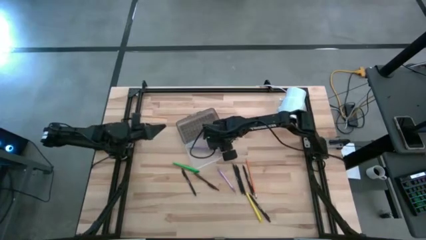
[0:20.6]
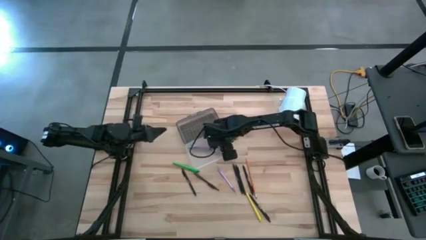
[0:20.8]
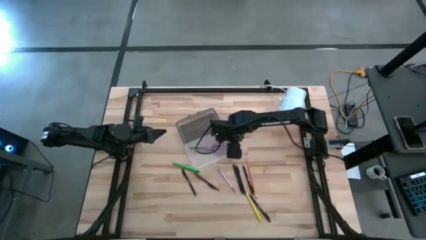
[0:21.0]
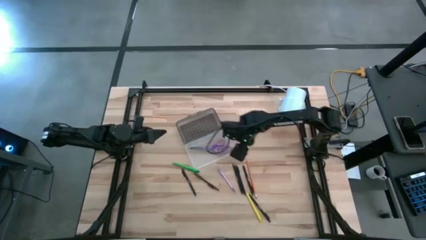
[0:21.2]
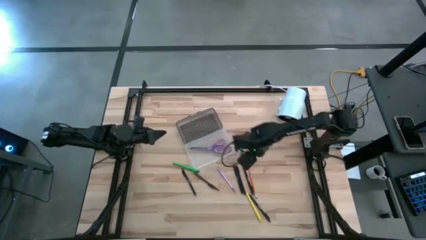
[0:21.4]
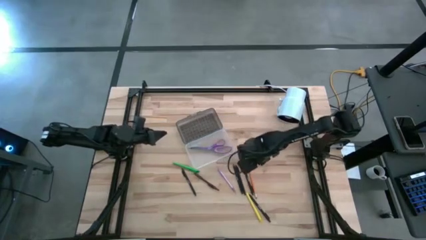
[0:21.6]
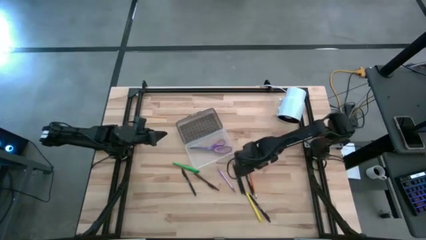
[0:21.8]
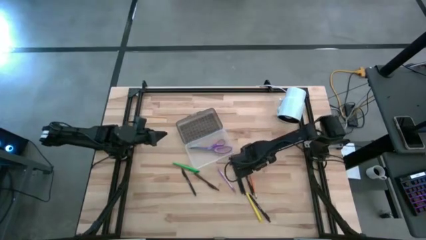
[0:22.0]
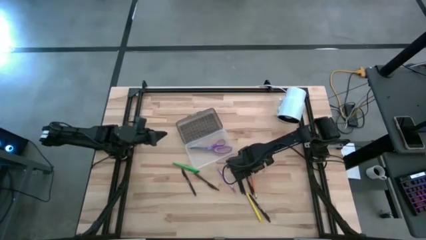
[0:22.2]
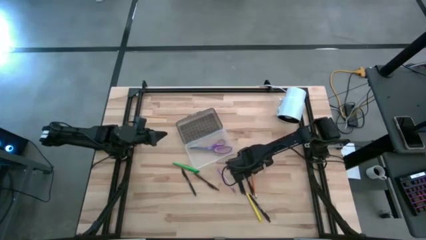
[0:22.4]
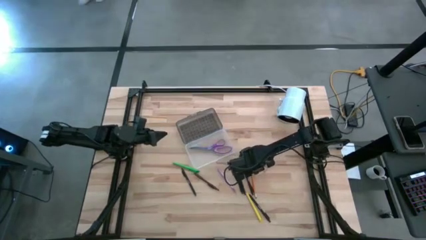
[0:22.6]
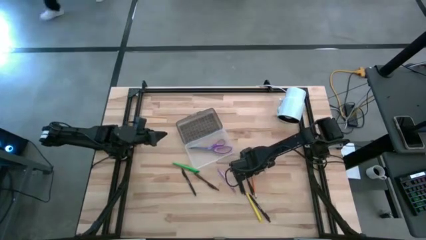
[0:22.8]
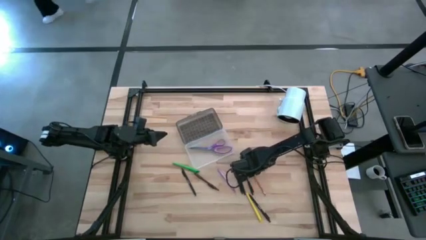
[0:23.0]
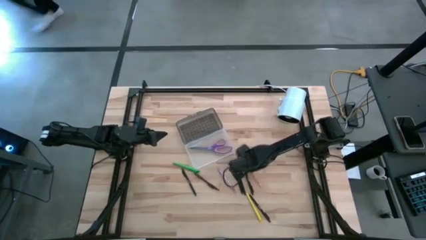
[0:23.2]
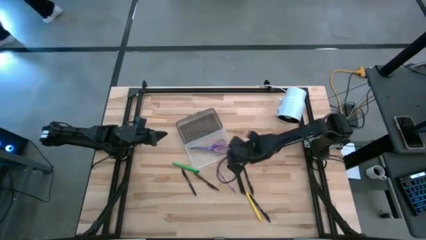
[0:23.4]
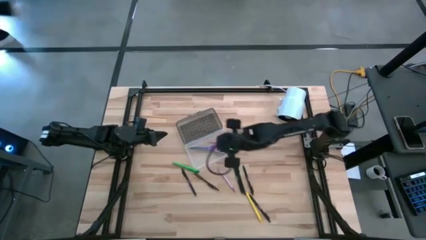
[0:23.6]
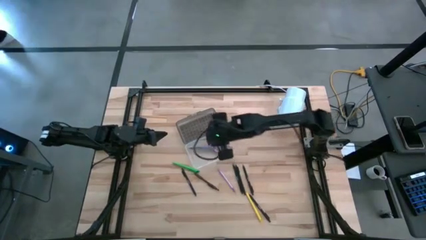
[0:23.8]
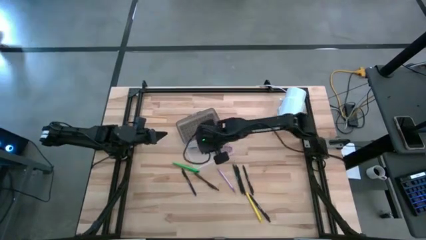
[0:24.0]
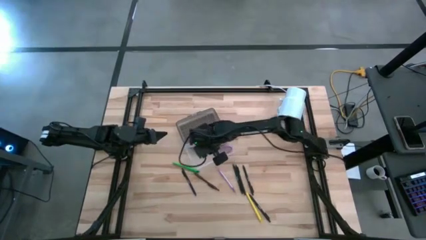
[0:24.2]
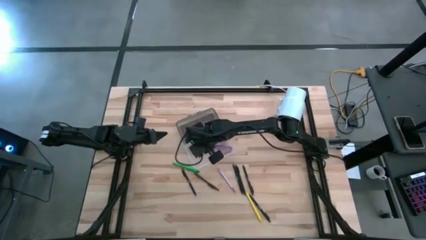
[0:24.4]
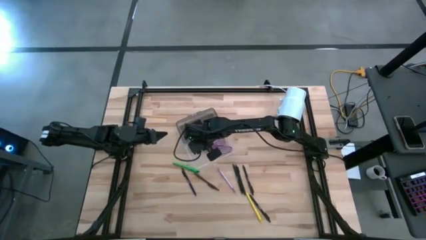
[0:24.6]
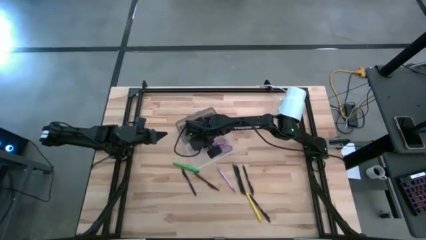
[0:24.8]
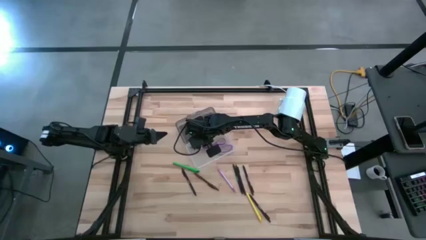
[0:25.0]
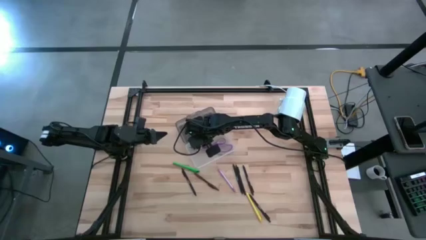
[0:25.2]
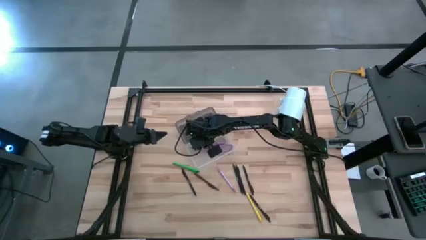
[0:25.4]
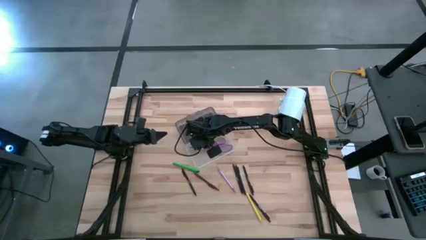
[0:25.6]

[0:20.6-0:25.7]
Task: Pick & place school supplies into a supply box
Put the orange pencil into the black supply box

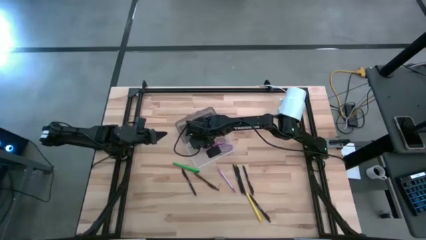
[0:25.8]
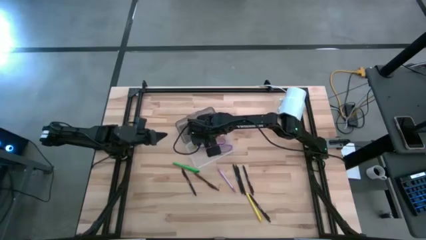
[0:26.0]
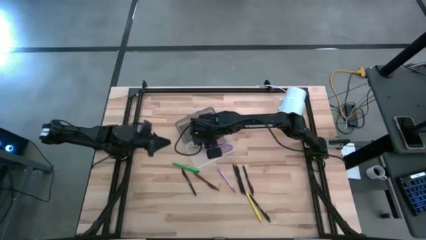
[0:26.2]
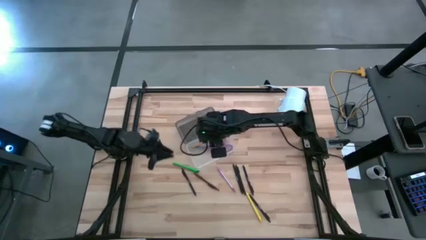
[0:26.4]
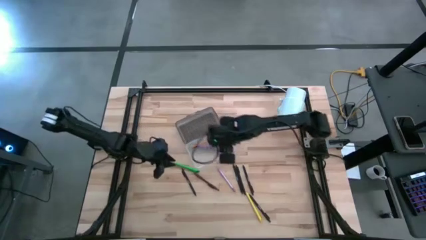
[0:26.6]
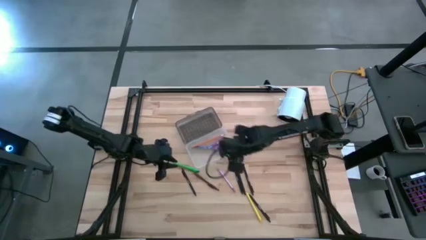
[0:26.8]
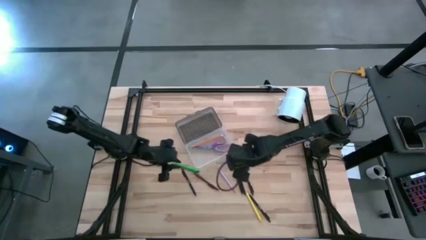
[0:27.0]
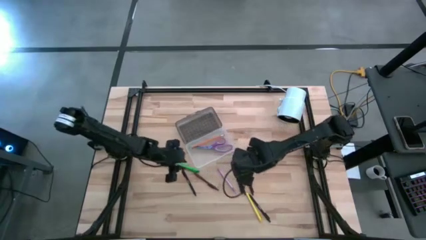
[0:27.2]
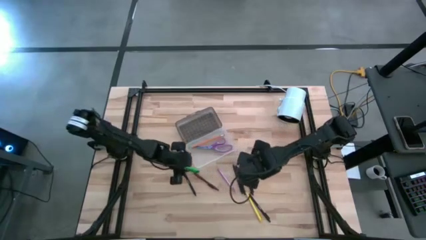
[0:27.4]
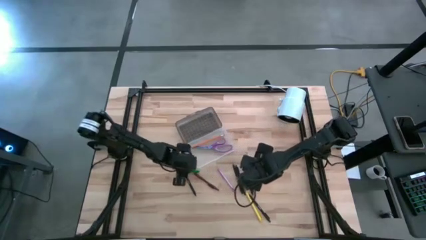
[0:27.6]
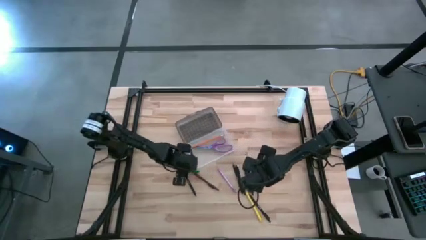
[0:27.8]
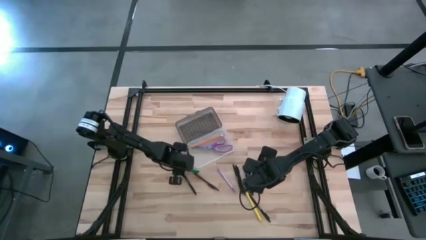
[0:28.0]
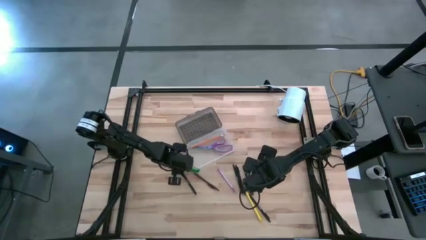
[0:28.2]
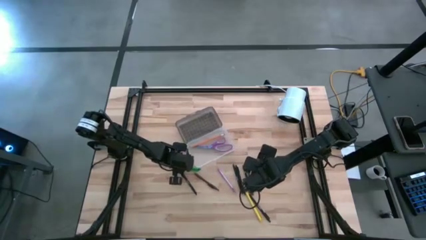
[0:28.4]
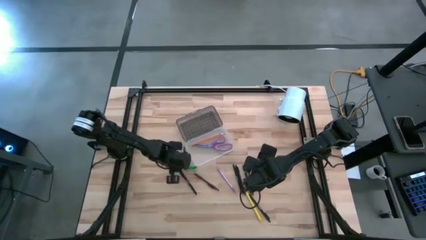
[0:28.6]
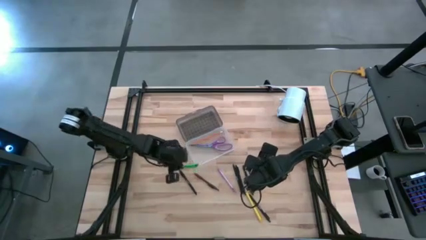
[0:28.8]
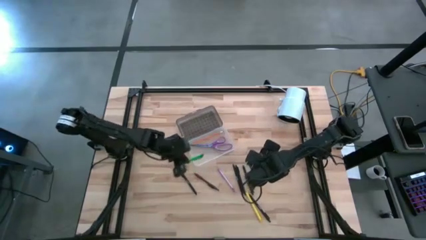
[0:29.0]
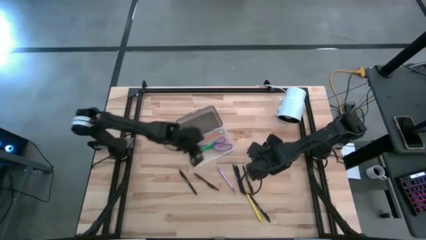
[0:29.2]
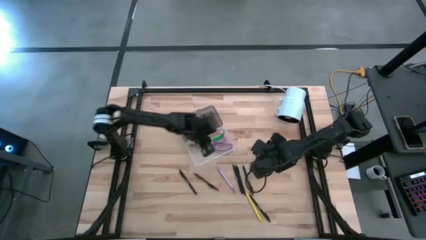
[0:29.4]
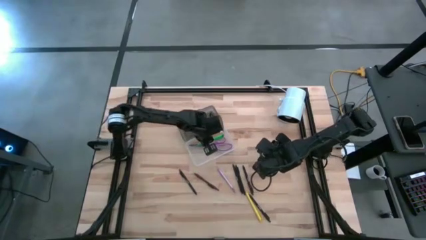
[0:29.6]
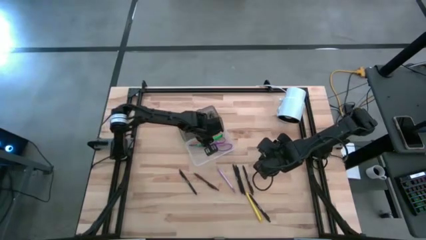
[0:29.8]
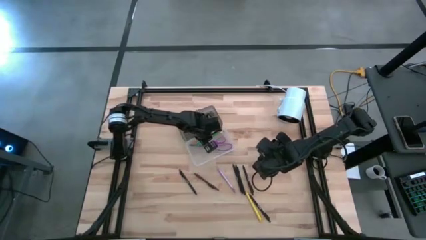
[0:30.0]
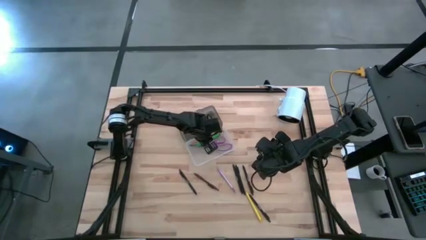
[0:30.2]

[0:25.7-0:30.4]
Put the green pen into the black supply box

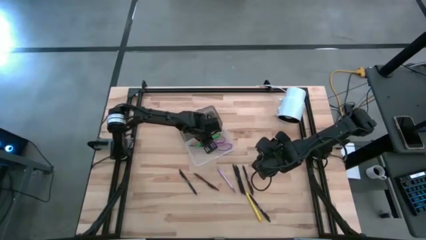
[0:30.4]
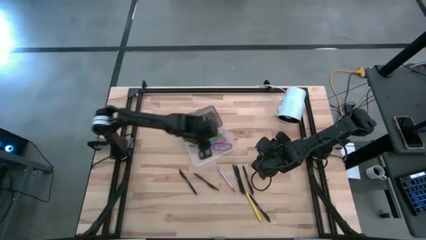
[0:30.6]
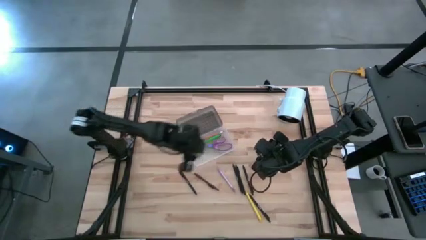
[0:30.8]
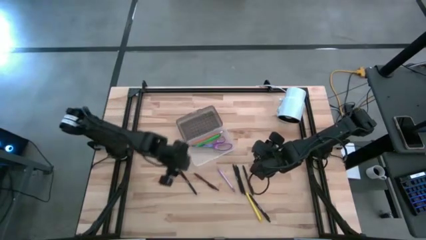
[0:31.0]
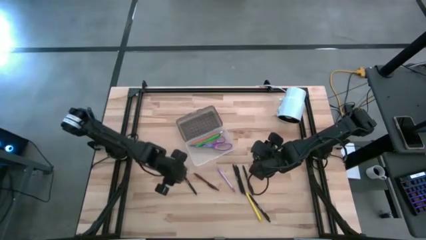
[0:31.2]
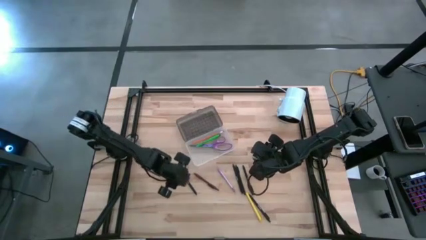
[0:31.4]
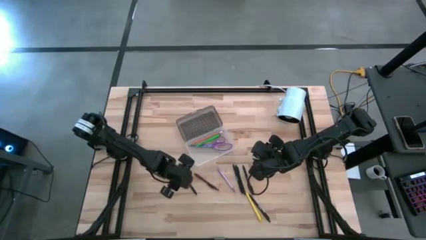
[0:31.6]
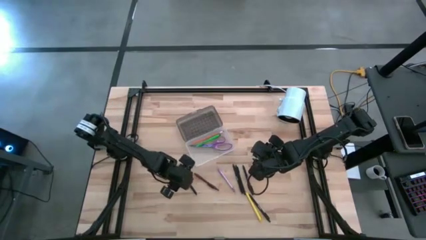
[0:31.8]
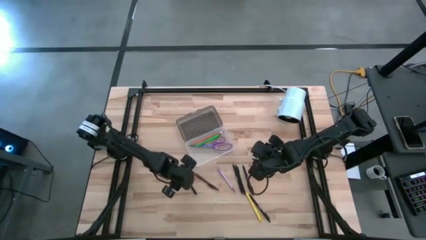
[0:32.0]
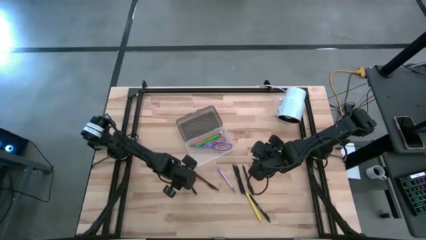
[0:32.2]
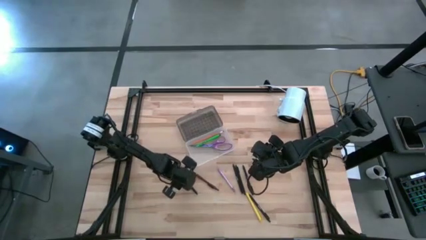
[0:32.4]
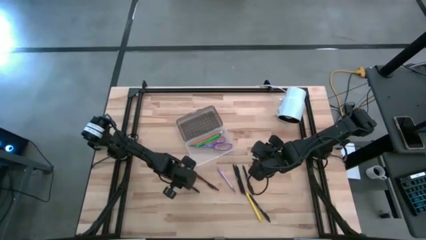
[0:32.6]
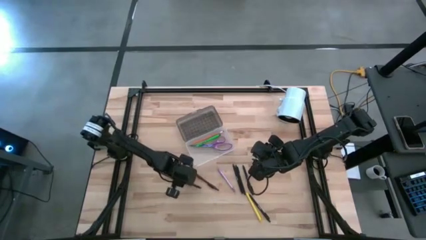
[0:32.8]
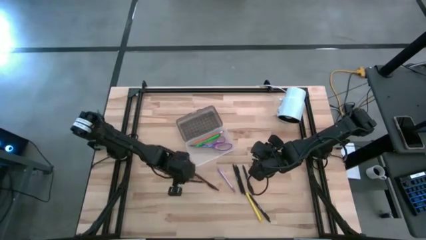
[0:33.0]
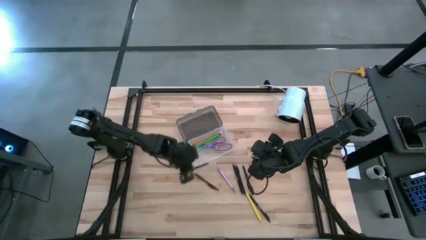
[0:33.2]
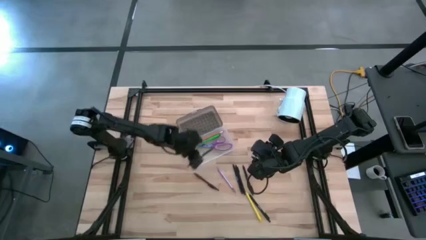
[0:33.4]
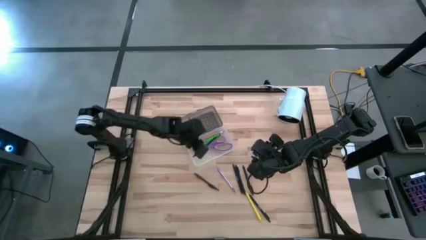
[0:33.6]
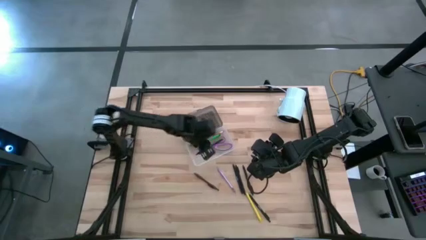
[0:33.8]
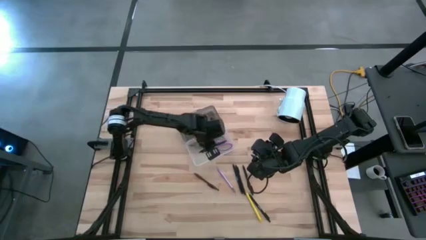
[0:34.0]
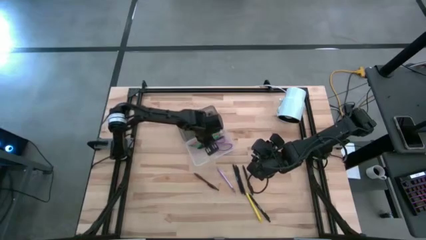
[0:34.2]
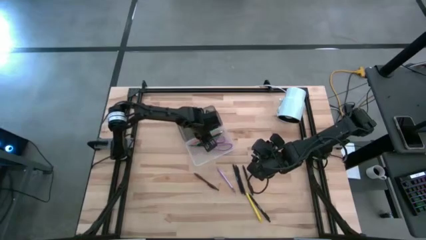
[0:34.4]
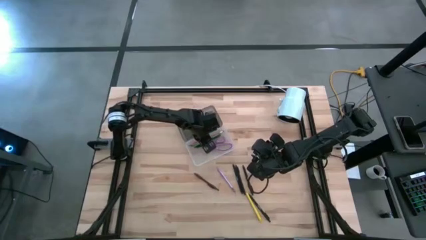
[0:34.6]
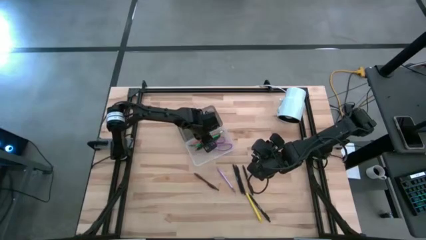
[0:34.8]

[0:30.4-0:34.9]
Put the black pen into the black supply box

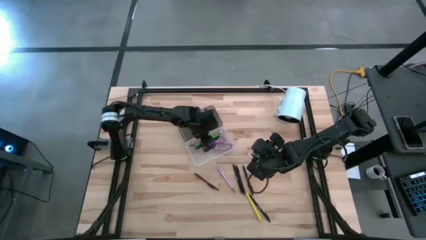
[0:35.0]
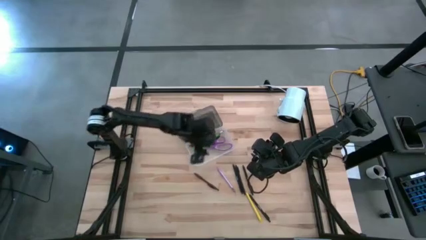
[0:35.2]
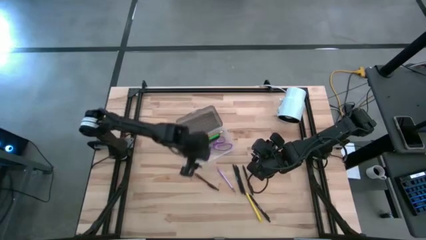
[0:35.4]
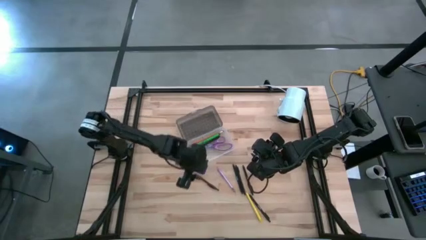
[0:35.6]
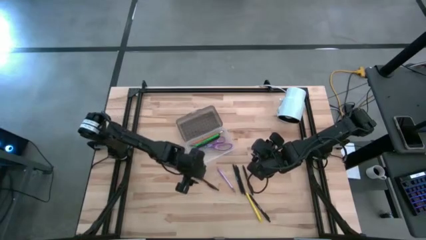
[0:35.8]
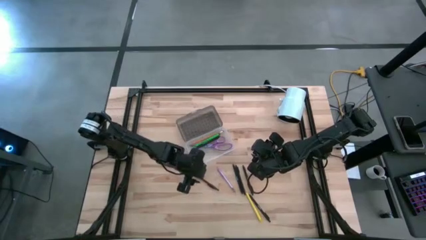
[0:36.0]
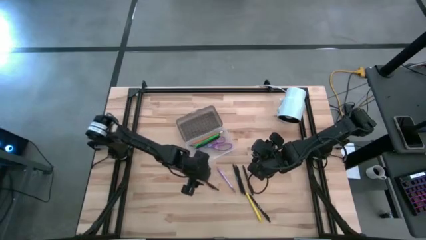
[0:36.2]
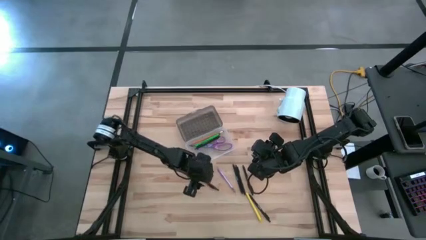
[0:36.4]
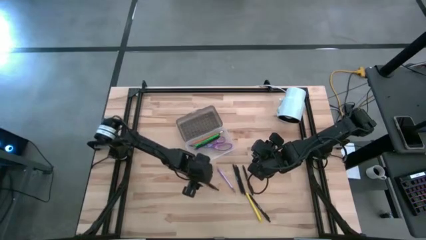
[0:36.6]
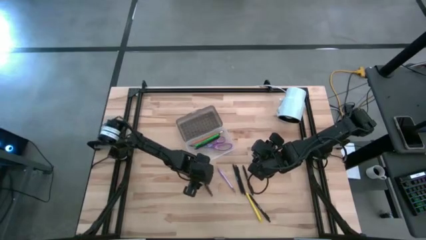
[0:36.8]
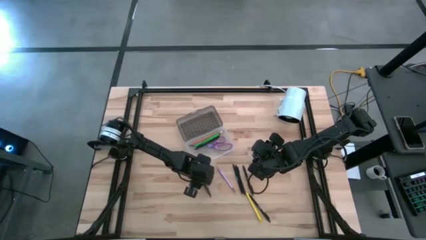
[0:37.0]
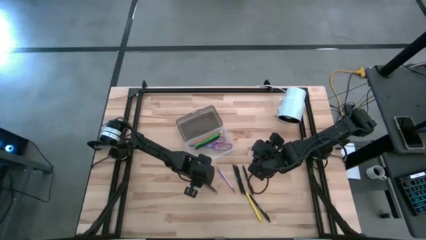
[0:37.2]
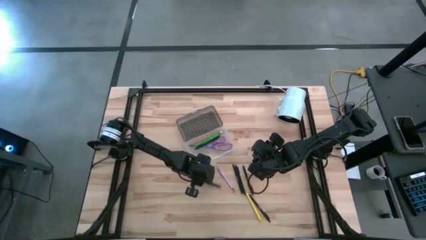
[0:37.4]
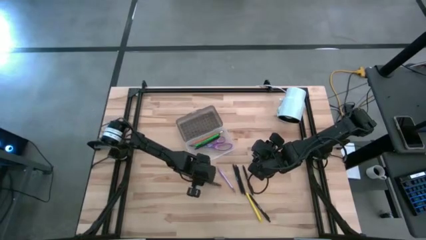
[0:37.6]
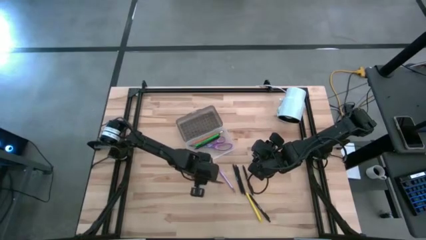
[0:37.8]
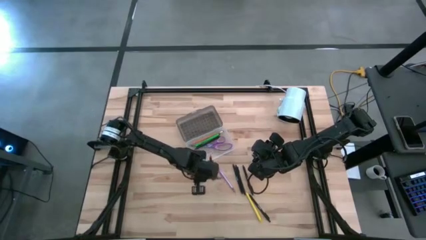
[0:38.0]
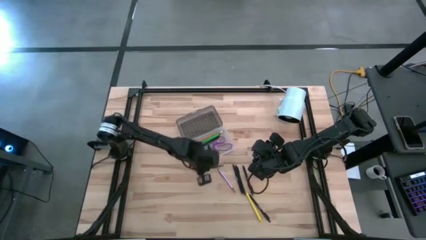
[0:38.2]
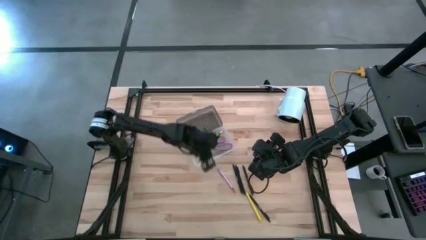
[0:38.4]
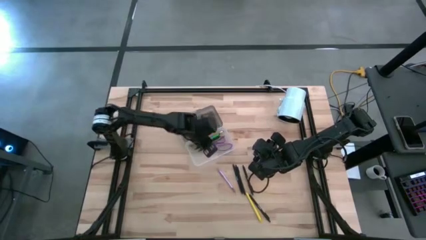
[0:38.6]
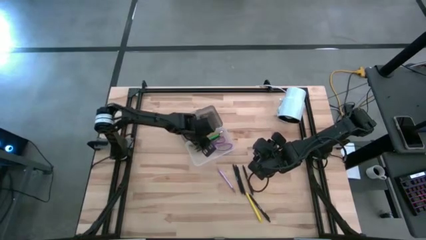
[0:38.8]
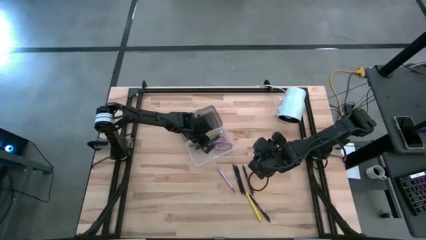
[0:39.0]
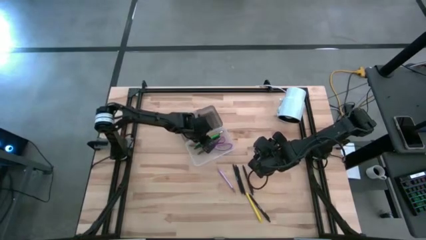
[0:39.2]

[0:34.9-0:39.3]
Put the brown pen into the black supply box
